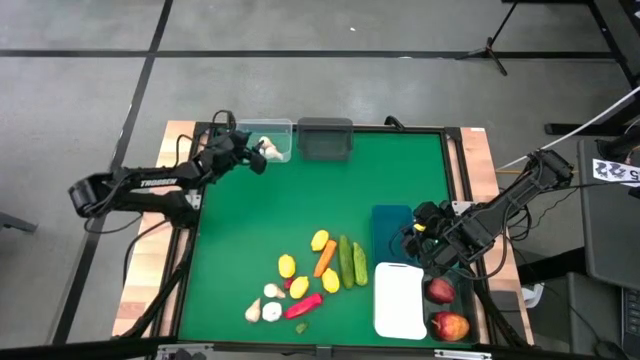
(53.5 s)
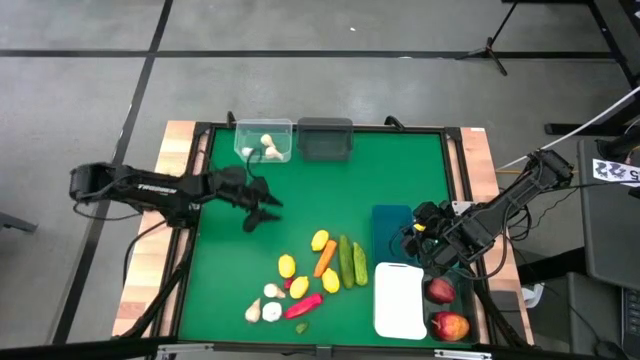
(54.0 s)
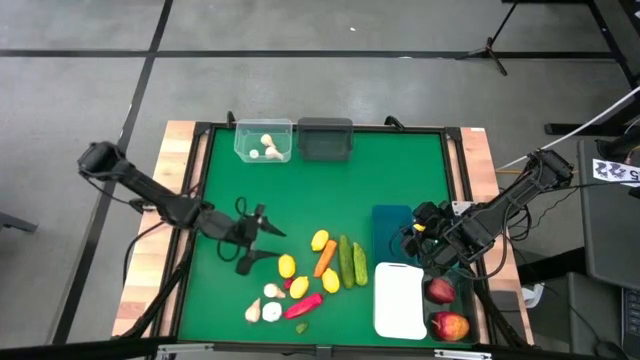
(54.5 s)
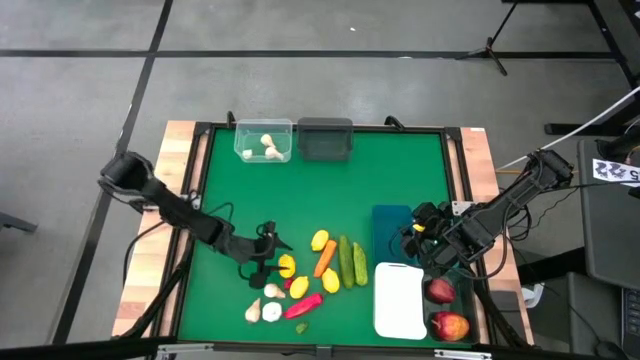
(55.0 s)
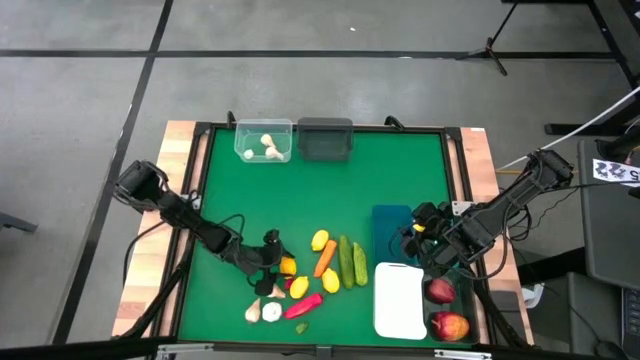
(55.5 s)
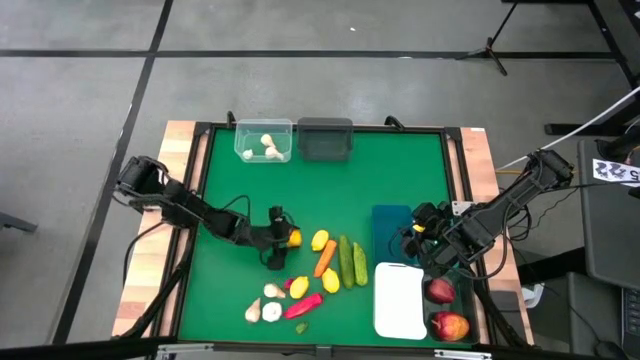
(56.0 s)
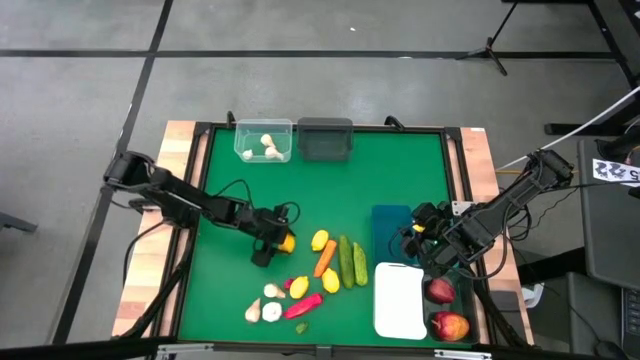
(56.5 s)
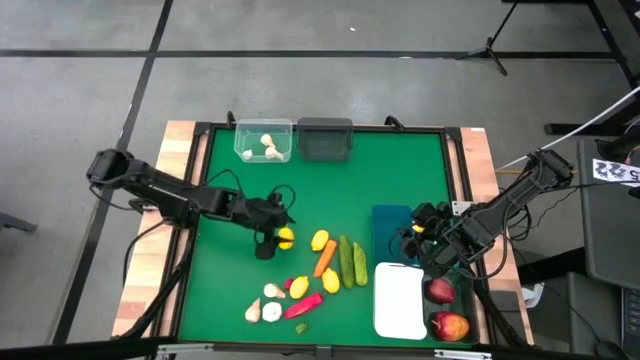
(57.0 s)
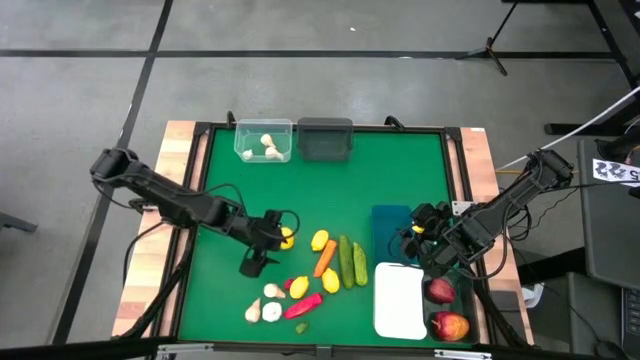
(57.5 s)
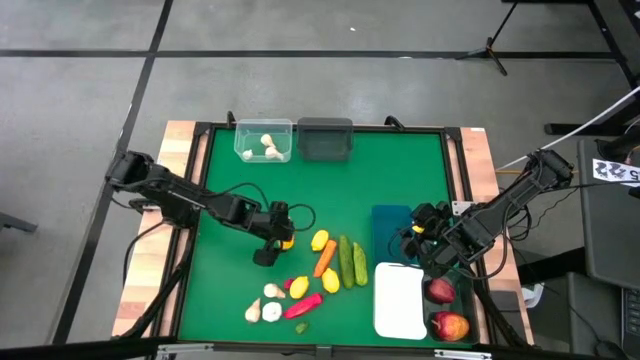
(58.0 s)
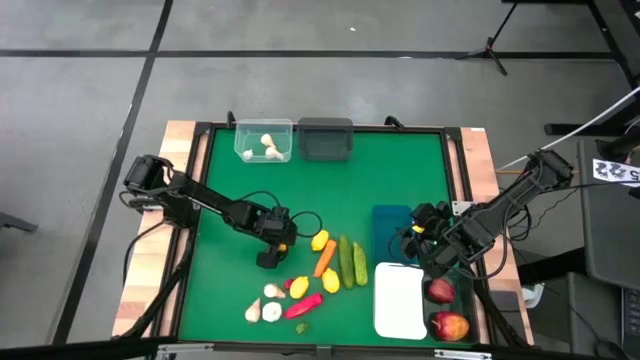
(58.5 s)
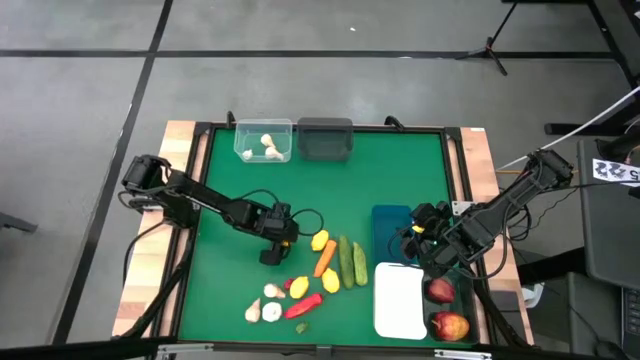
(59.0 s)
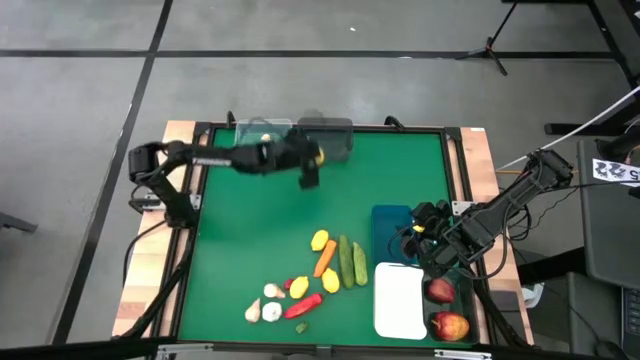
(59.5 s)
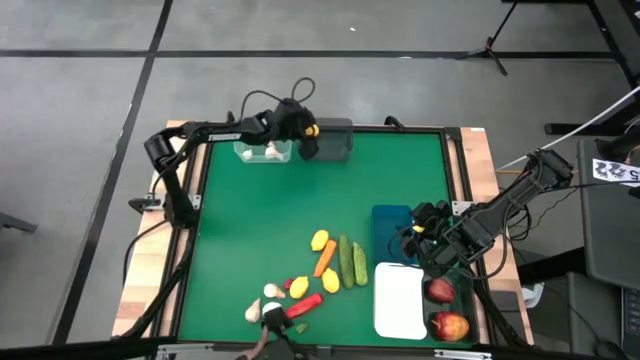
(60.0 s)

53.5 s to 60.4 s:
Task: Sort produce into baskets
Put the yellow lemon into the top black bin

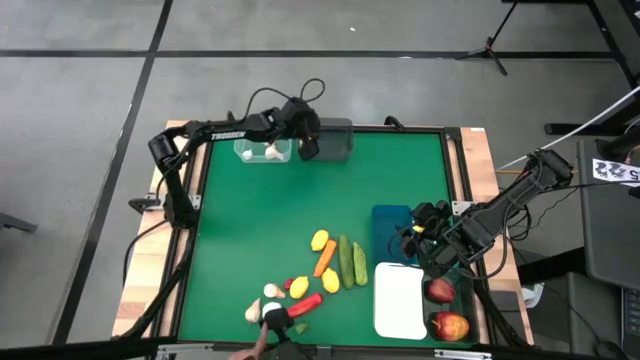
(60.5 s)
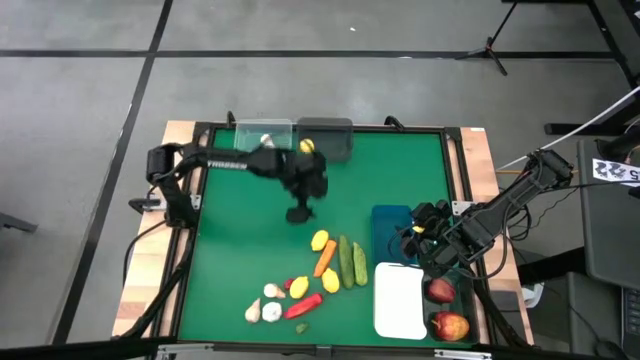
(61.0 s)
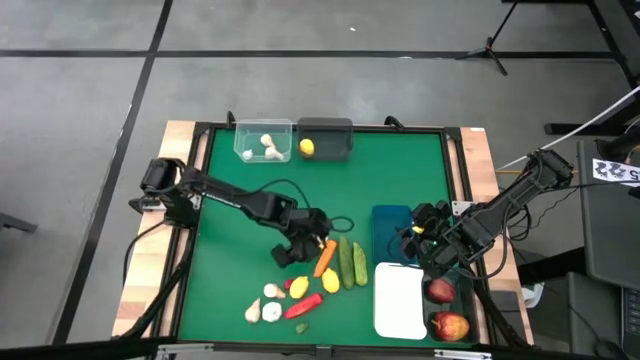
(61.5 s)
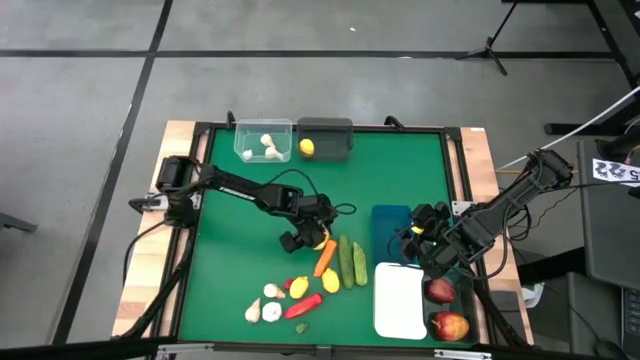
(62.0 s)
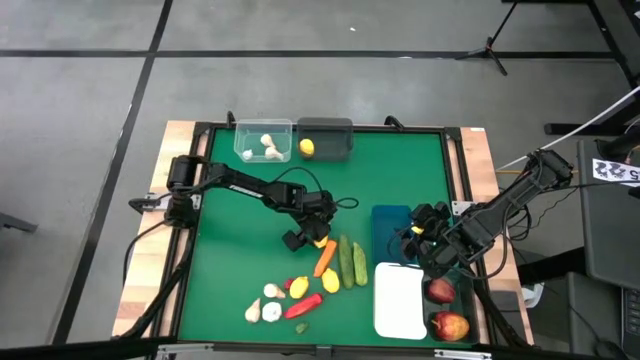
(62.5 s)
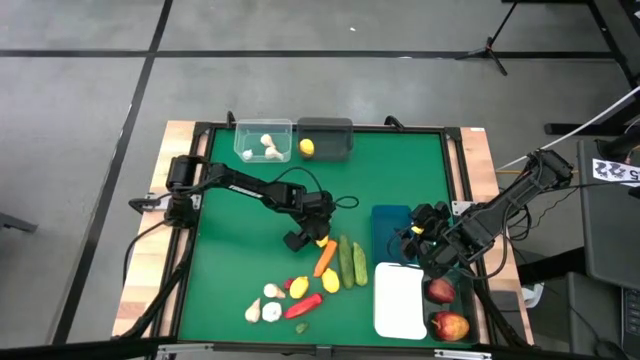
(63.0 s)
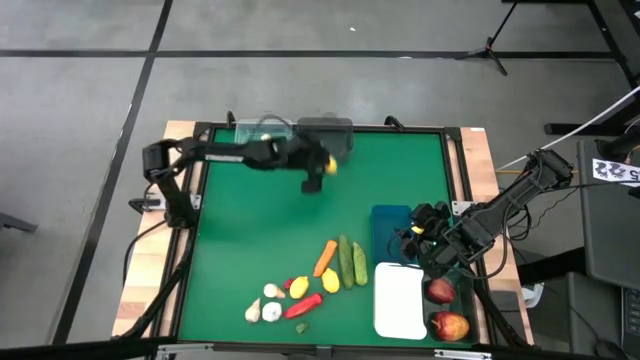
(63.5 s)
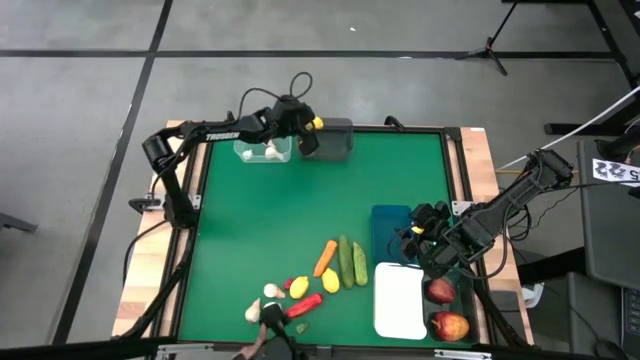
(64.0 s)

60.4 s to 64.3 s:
Put the yellow lemon into the top black bin

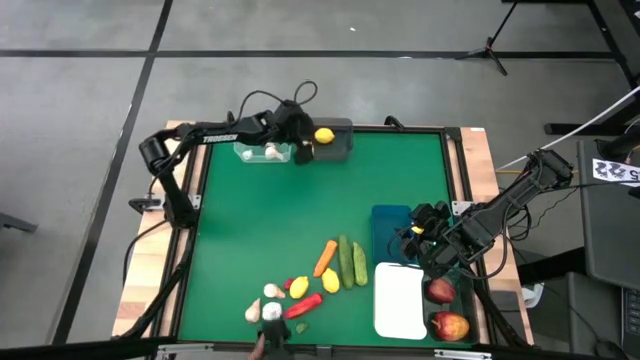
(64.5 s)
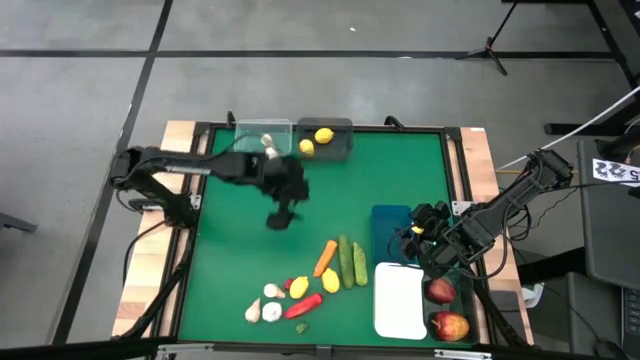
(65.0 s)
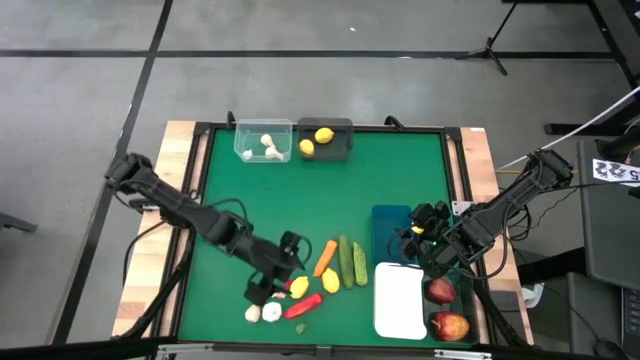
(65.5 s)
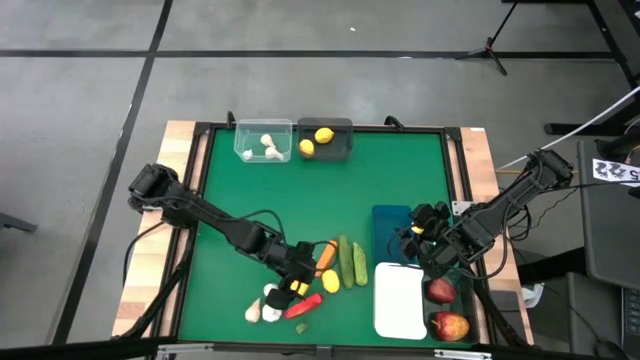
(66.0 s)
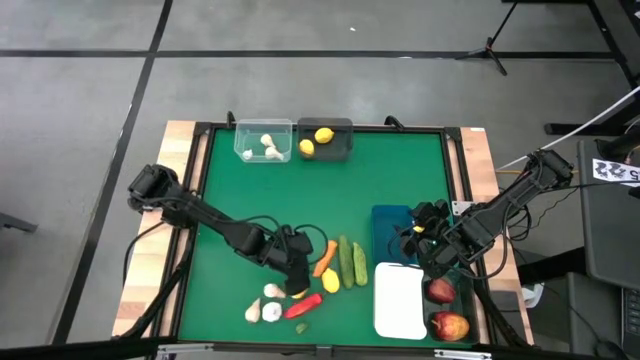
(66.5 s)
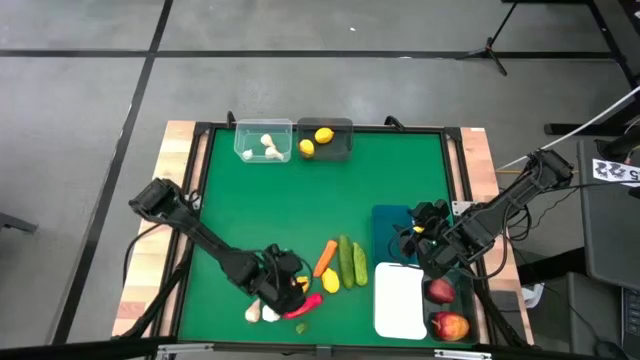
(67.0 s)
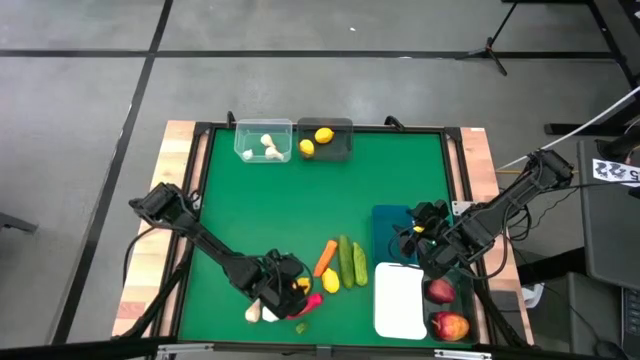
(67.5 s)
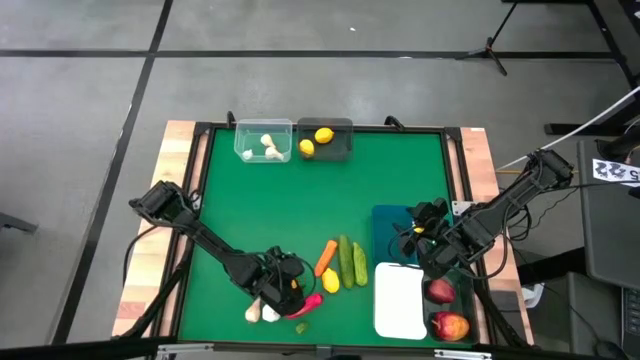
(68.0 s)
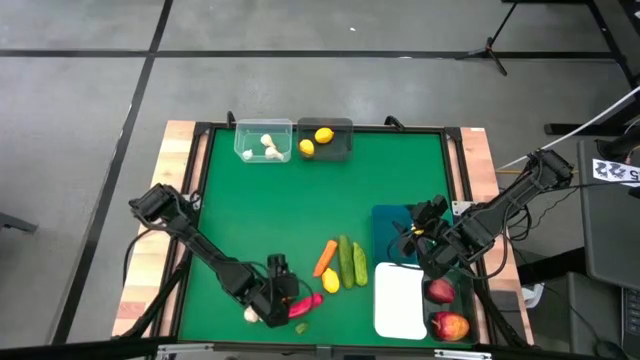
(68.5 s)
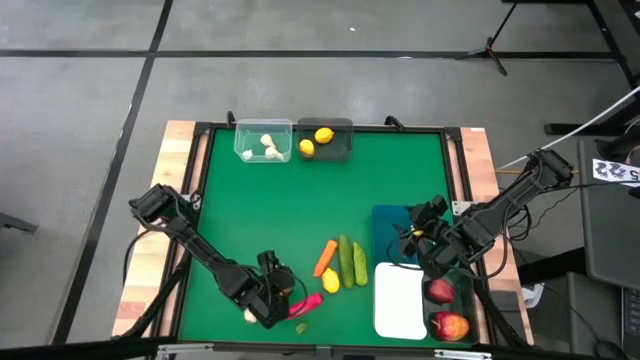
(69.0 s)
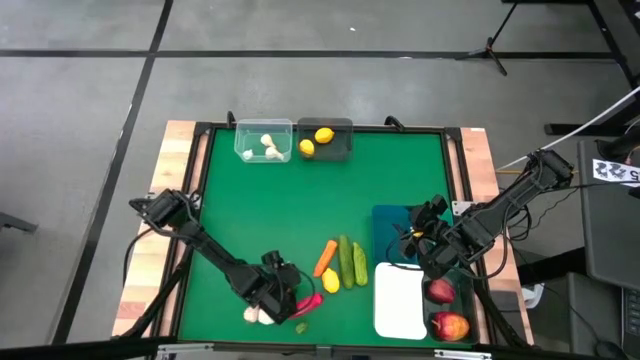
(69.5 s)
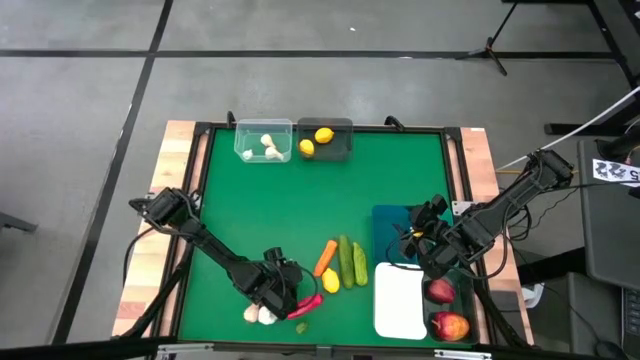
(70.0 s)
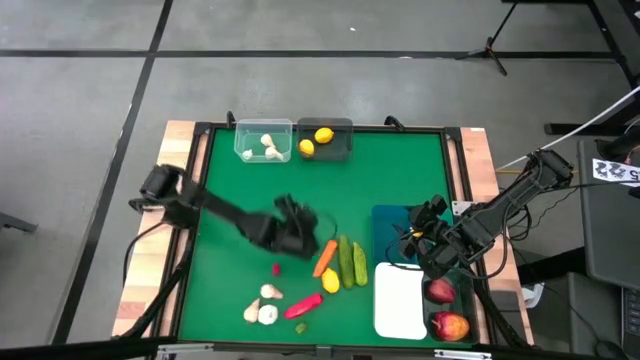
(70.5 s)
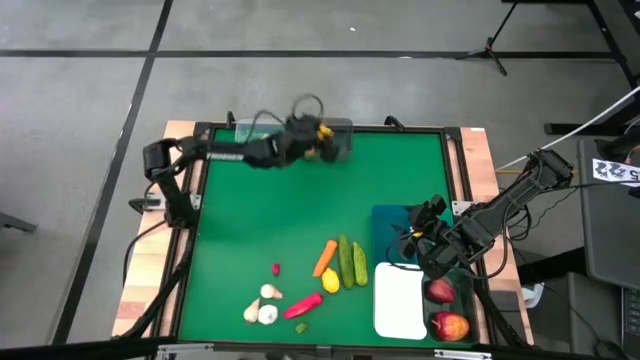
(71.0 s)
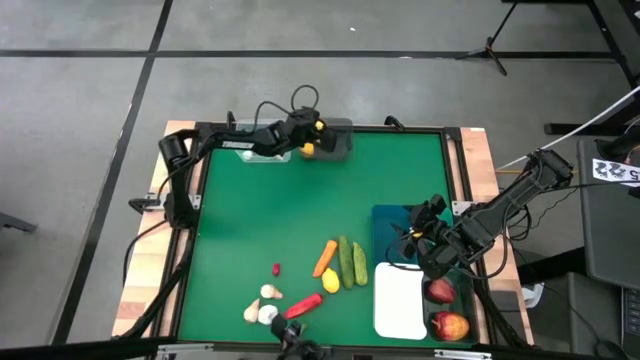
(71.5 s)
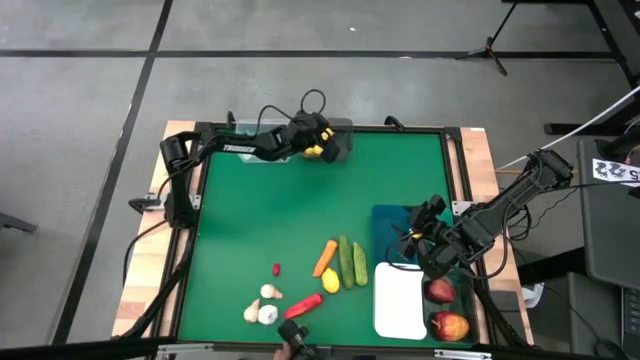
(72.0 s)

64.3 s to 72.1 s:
Put the yellow lemon into the top black bin

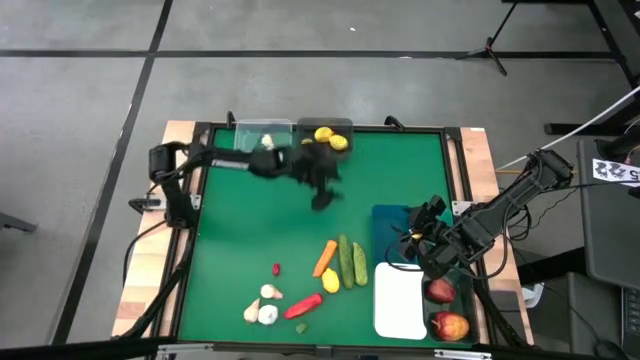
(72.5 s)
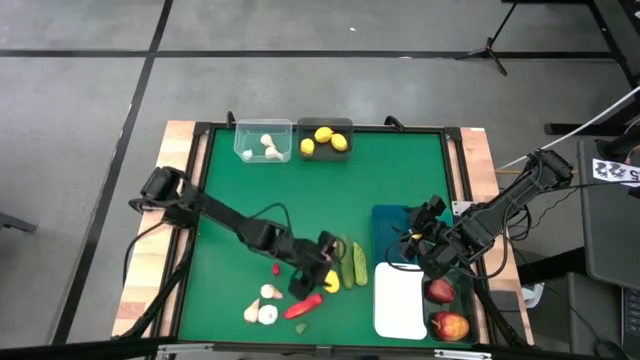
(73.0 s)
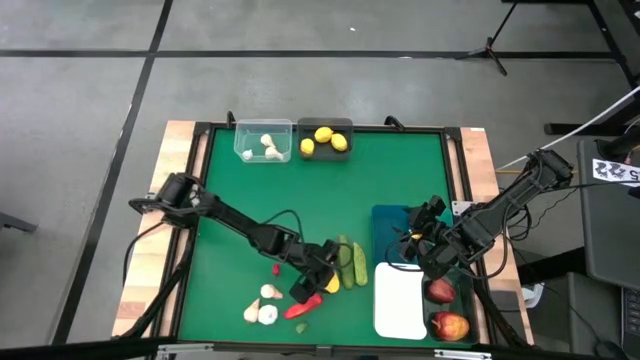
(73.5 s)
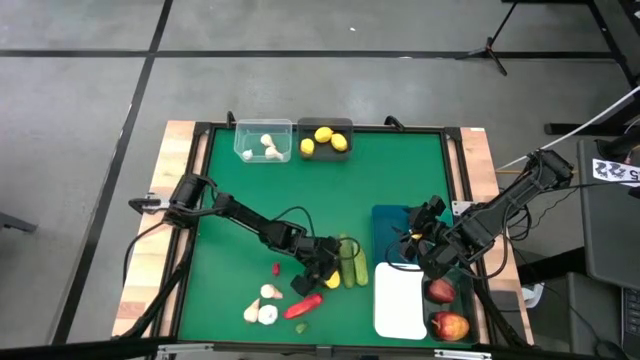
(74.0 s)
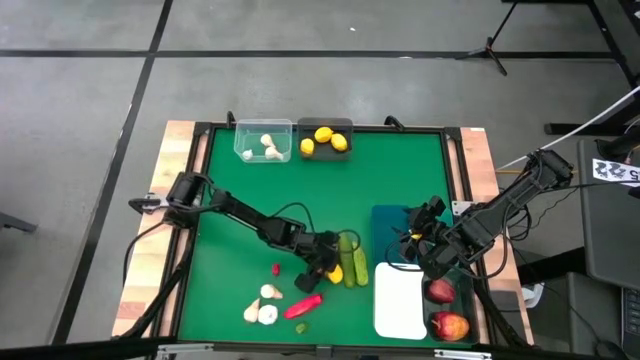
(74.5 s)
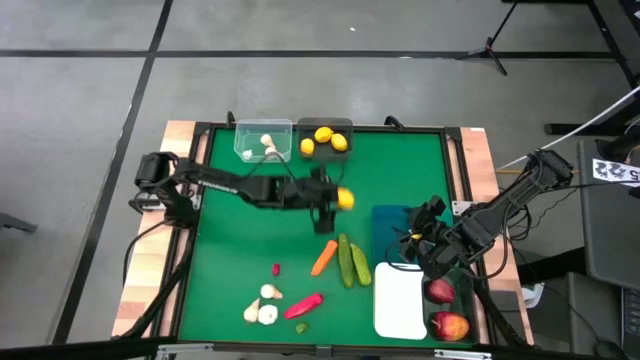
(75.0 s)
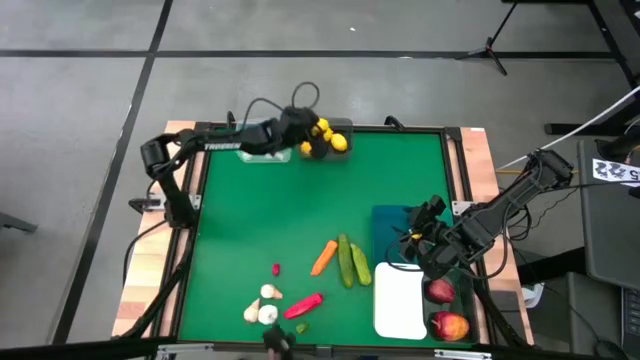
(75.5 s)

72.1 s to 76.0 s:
Put the yellow lemon into the top black bin
